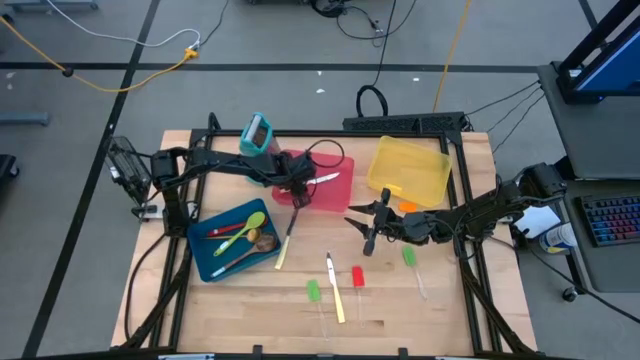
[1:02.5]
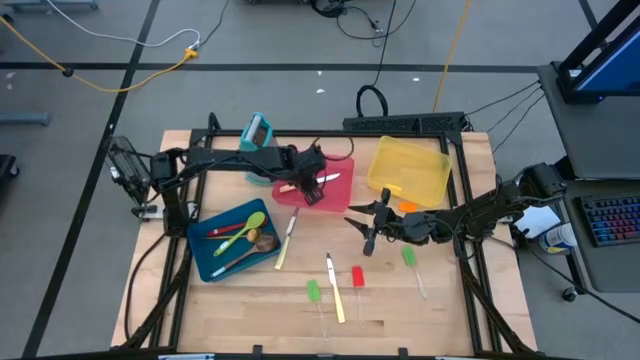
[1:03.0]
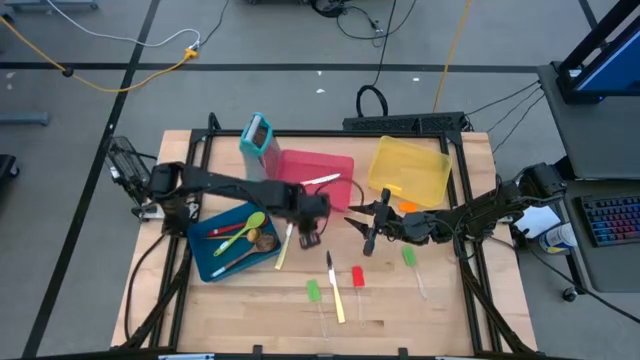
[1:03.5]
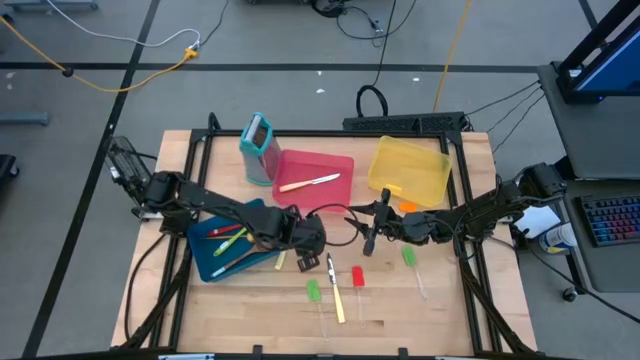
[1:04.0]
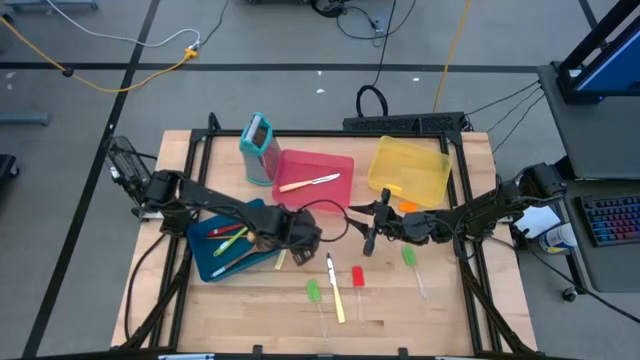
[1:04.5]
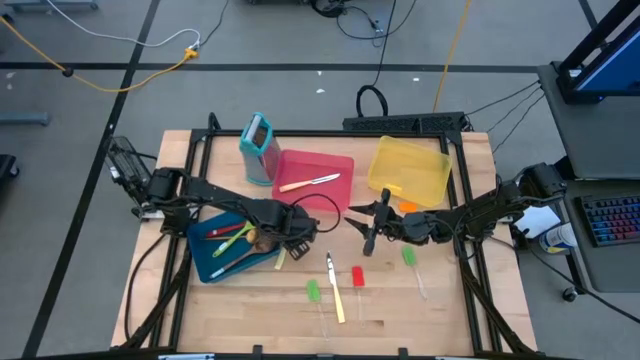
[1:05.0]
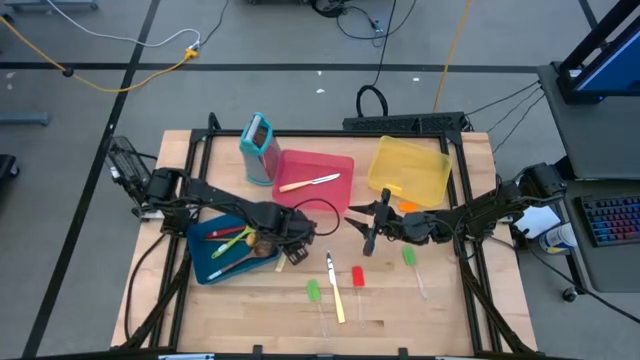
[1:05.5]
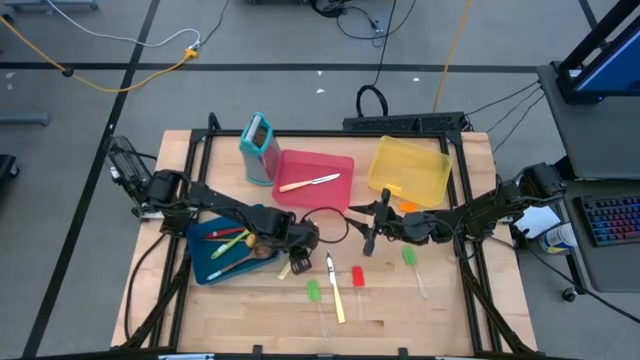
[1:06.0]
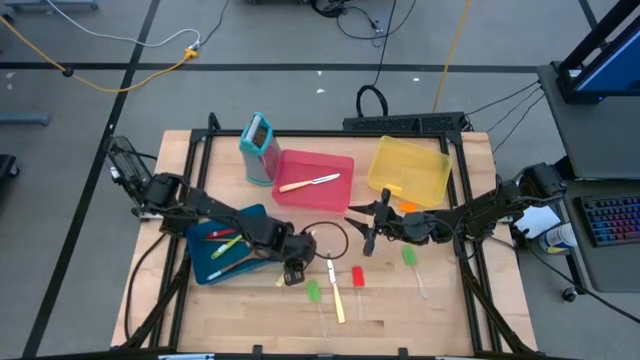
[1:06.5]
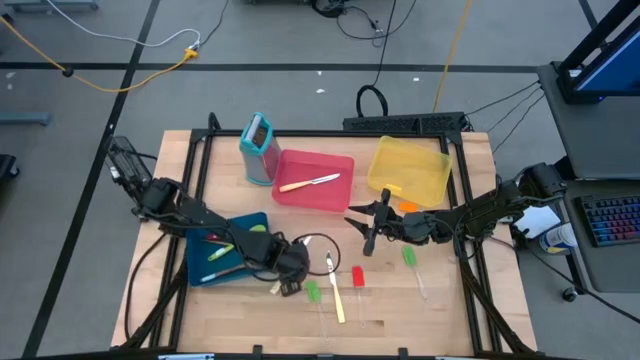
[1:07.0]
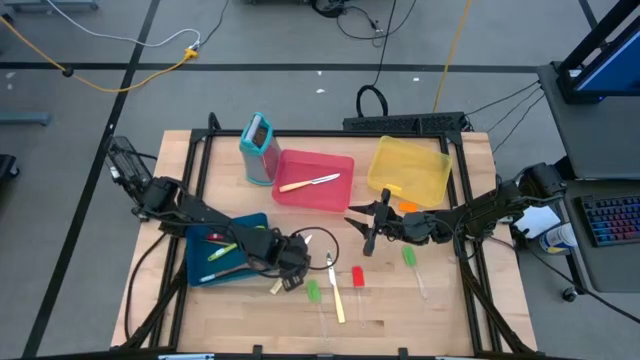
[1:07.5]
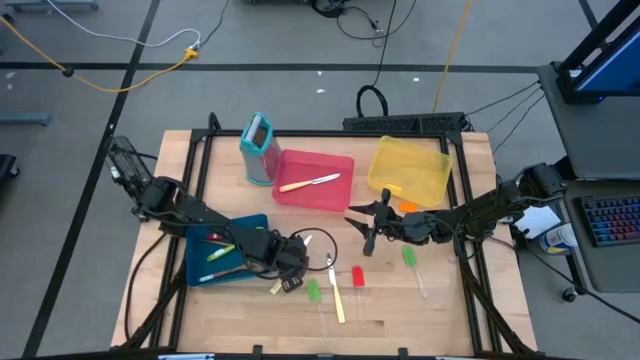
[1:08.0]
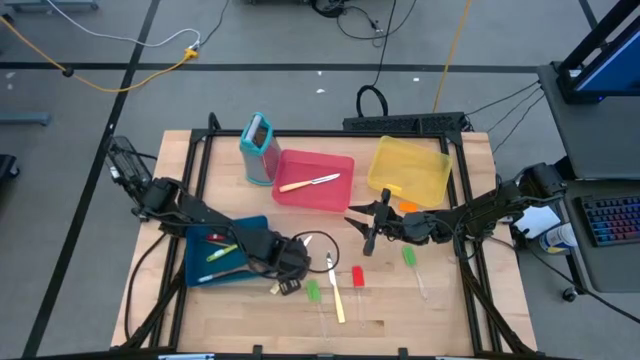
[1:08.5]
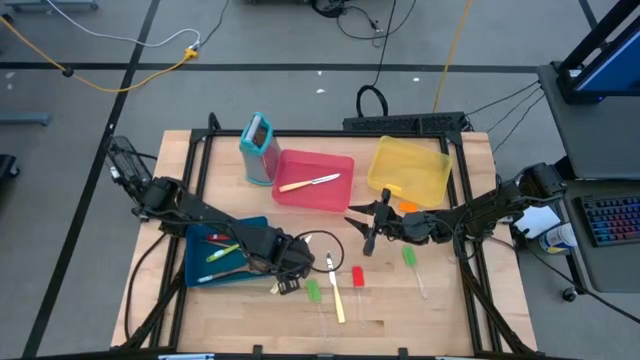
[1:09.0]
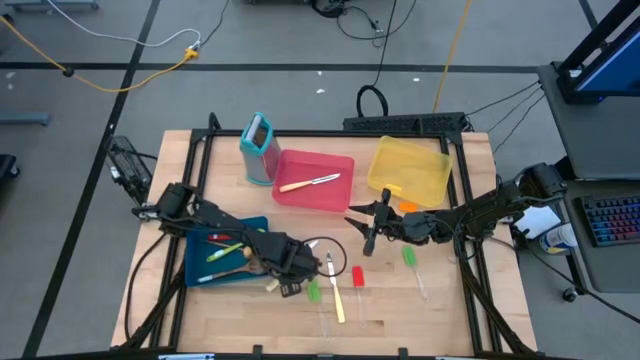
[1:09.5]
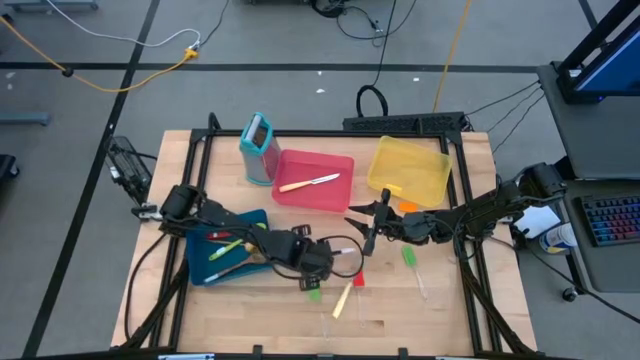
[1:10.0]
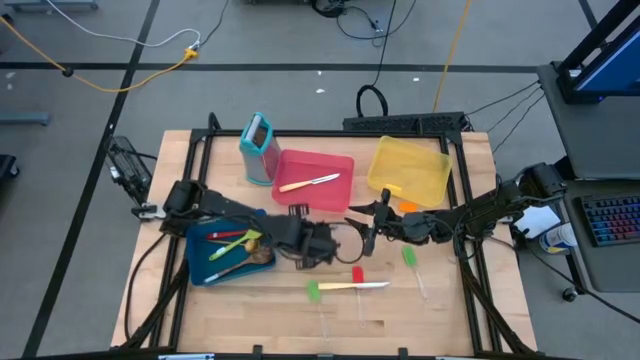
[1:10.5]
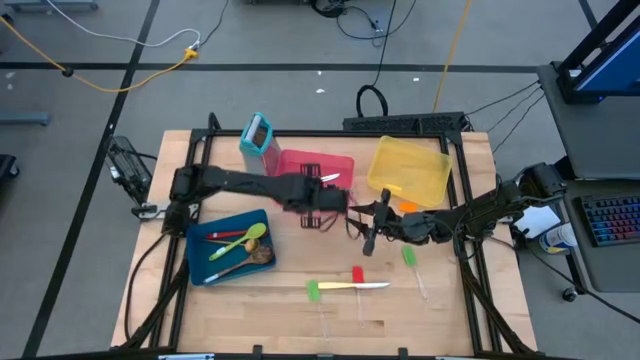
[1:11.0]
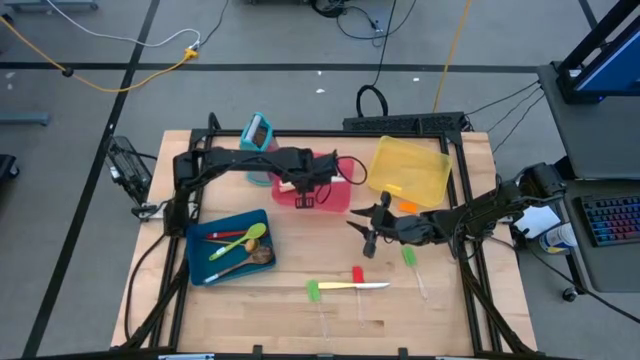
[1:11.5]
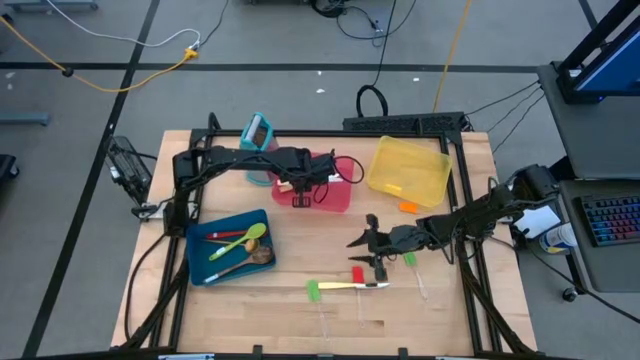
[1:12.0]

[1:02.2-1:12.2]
Task: Pick & Place Kitchen Items
Put the top yellow knife into the pink bin

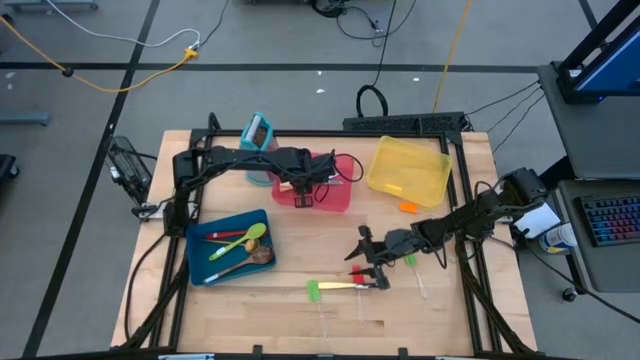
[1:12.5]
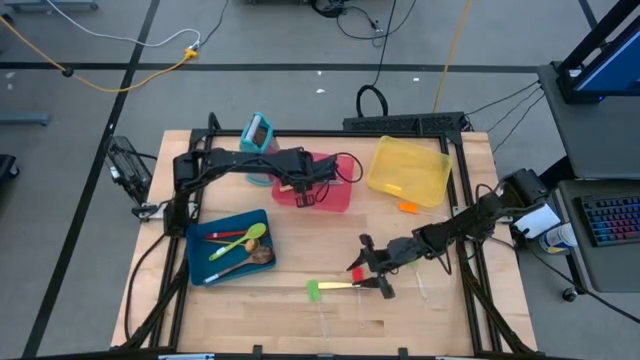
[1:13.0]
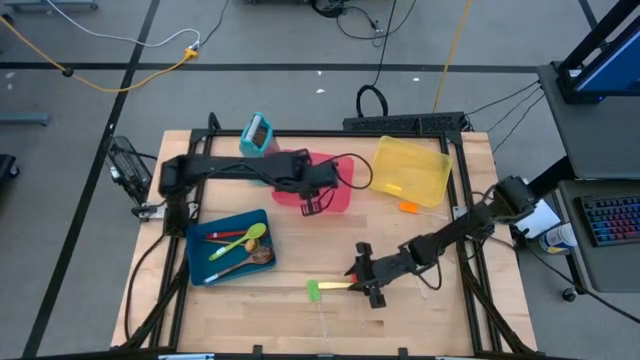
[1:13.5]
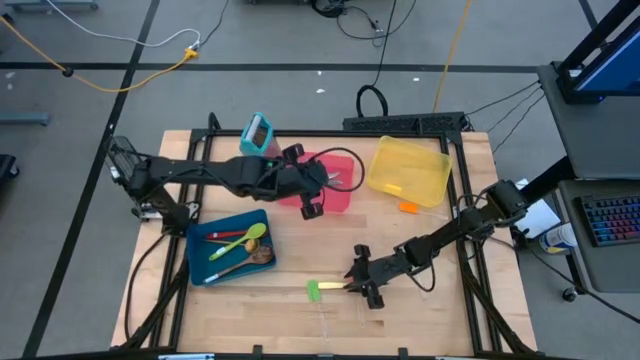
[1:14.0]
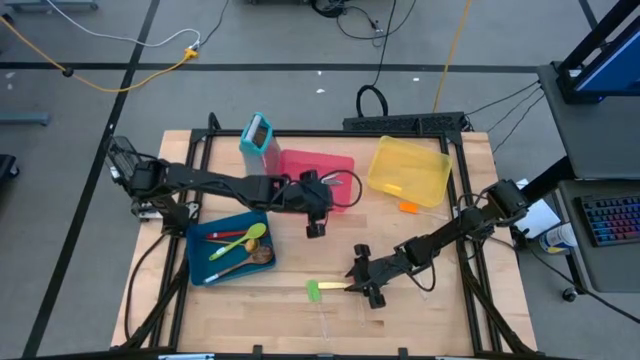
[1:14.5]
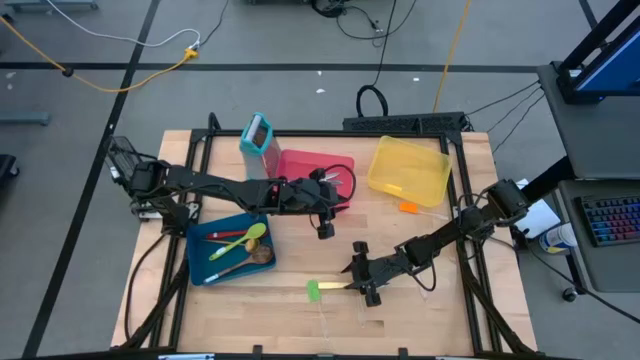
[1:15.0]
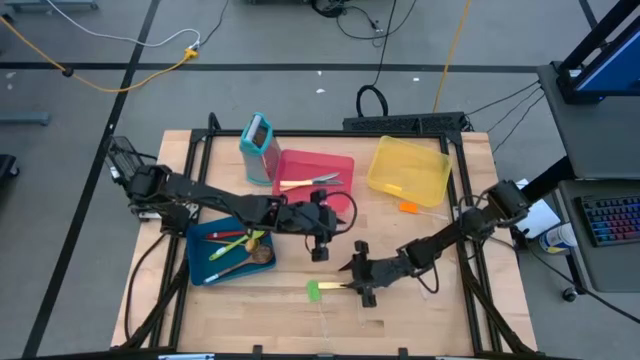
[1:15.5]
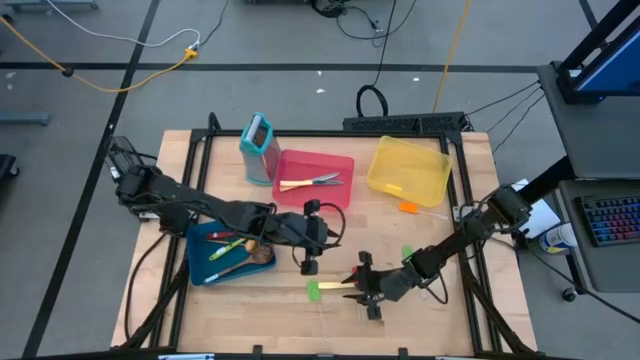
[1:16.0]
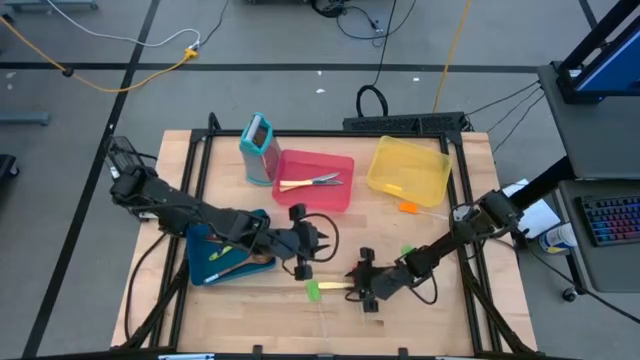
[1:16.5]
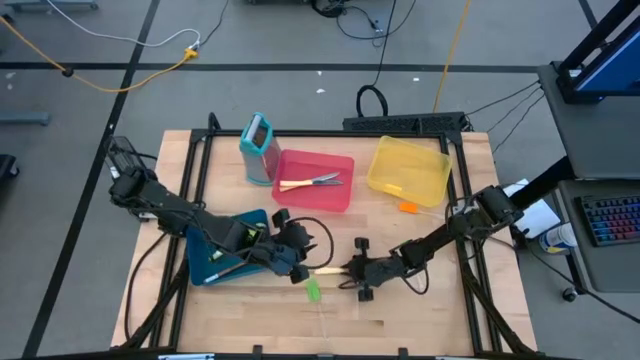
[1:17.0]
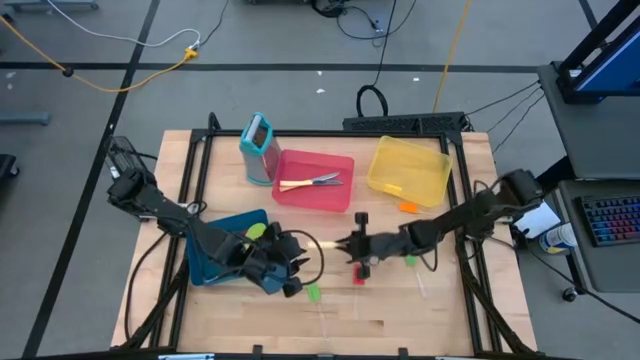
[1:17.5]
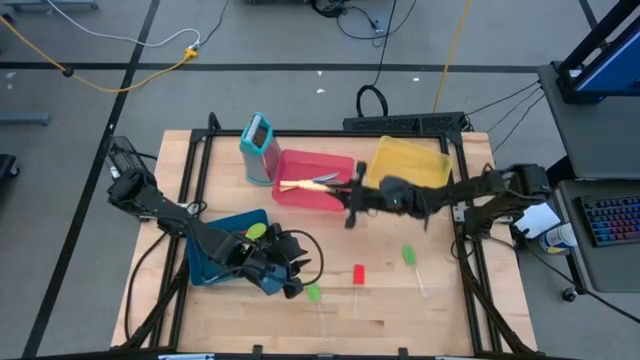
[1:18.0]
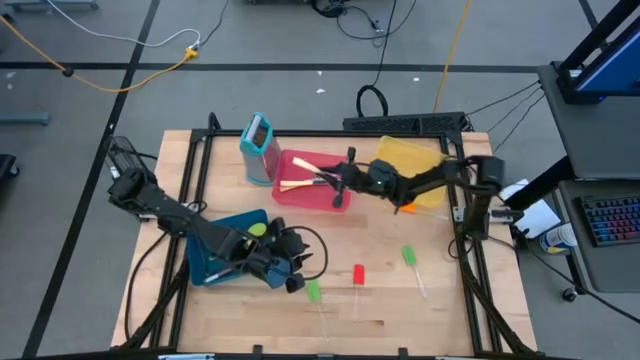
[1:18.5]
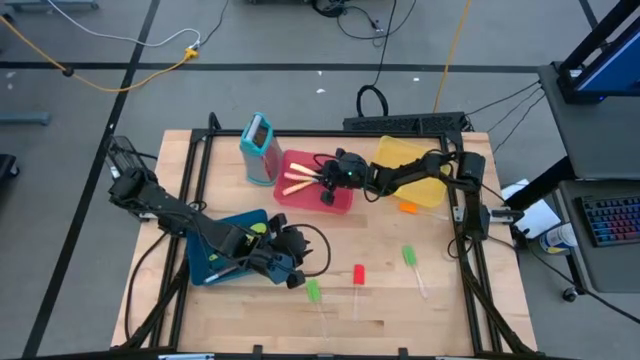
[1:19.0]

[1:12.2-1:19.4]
Put the yellow knife into the pink bin

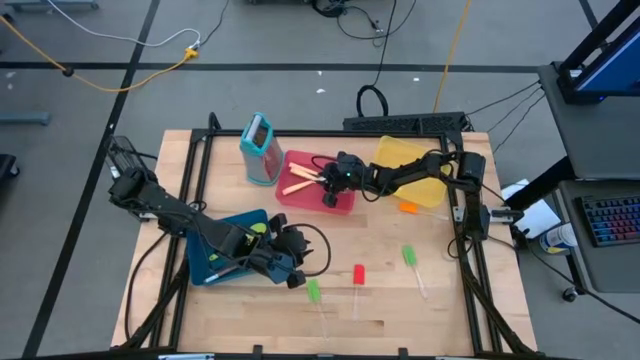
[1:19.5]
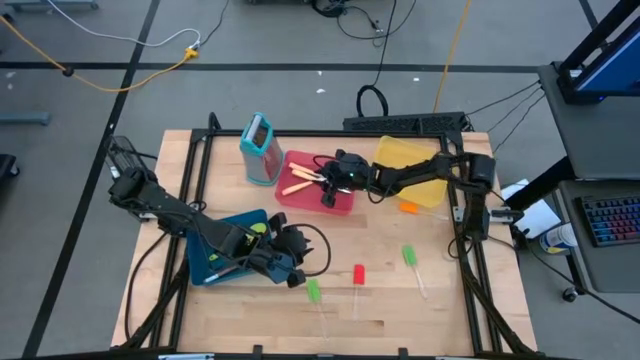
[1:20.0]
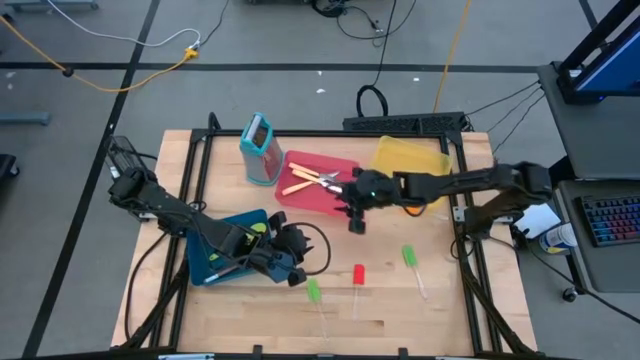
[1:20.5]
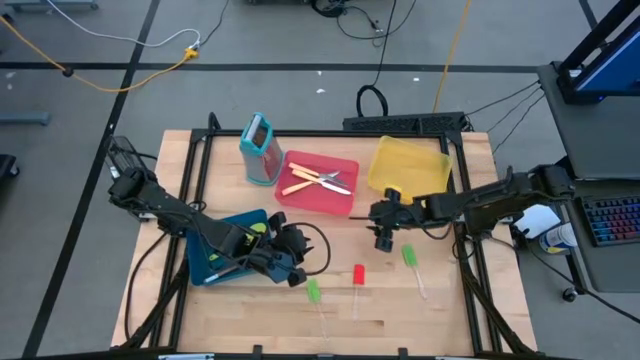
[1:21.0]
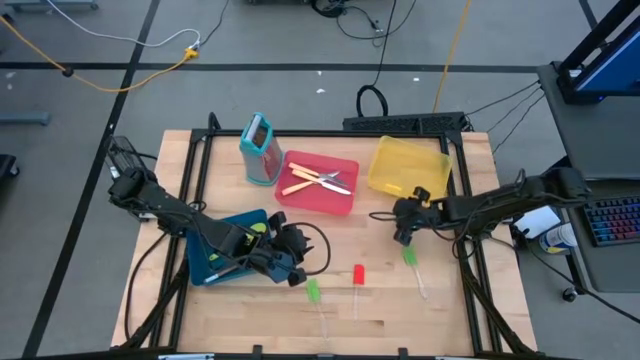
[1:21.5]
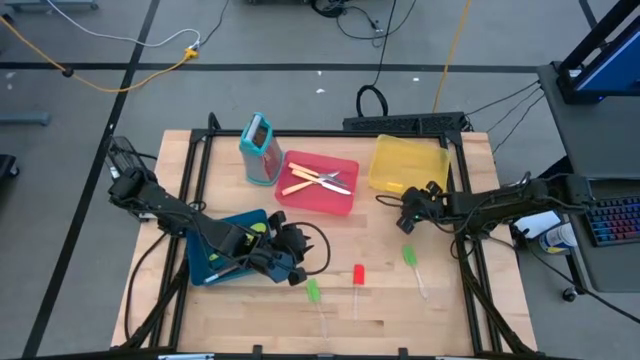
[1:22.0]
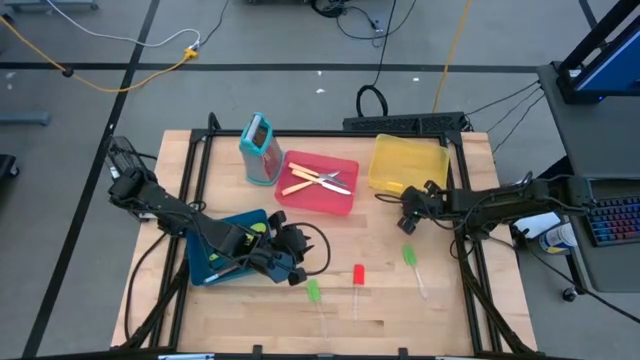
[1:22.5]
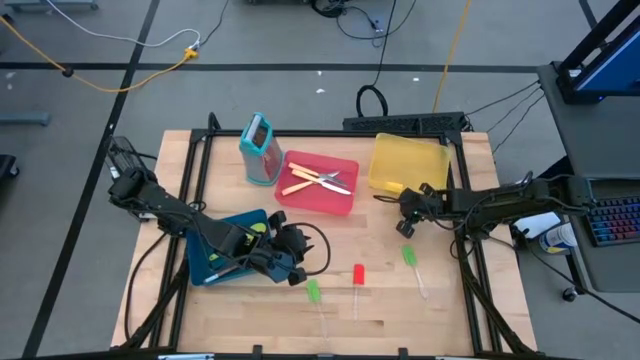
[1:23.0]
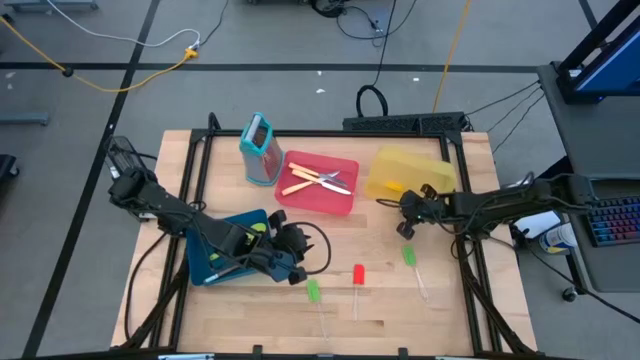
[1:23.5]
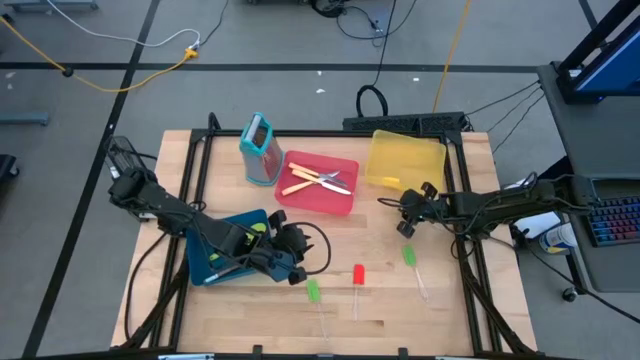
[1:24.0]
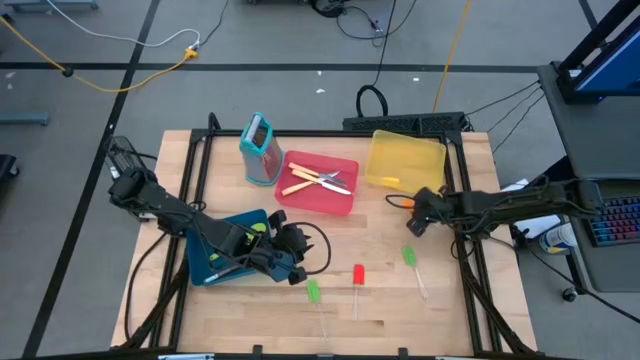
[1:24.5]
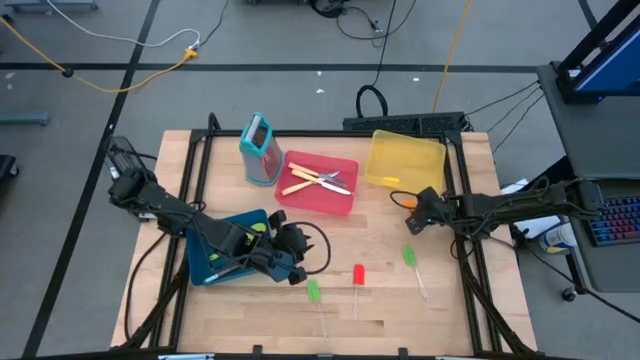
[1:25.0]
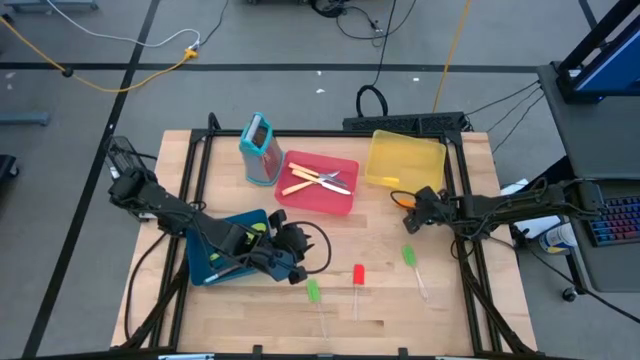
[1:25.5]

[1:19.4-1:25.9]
Put the orange spatula into the yellow bin
